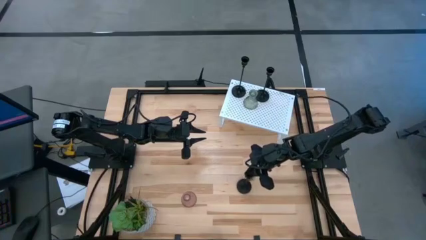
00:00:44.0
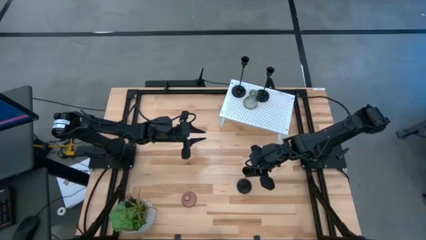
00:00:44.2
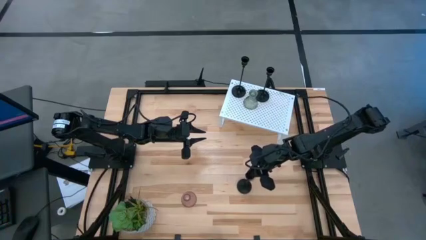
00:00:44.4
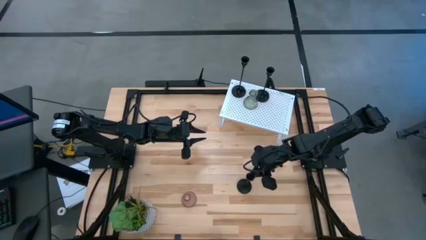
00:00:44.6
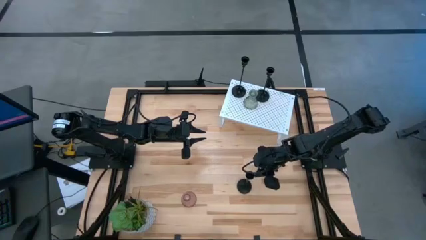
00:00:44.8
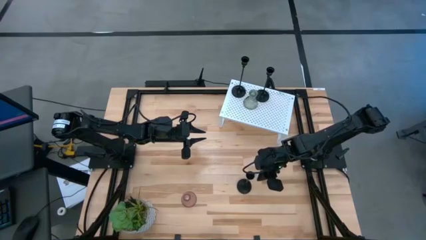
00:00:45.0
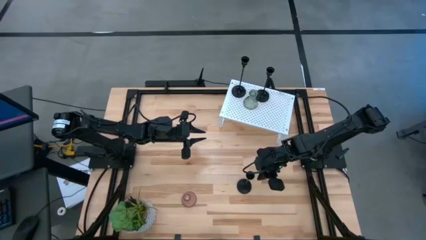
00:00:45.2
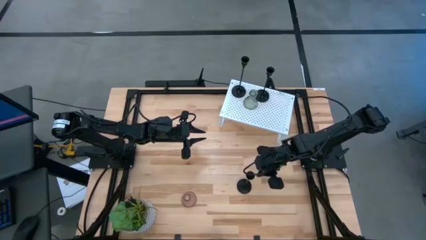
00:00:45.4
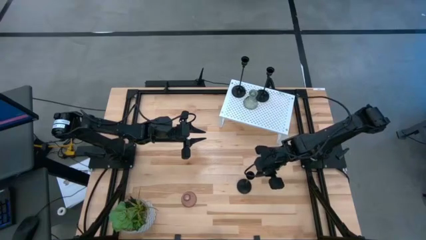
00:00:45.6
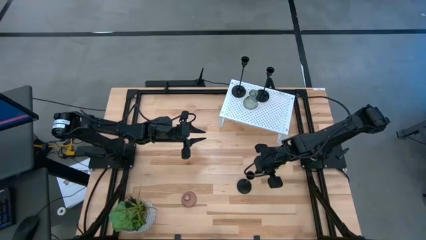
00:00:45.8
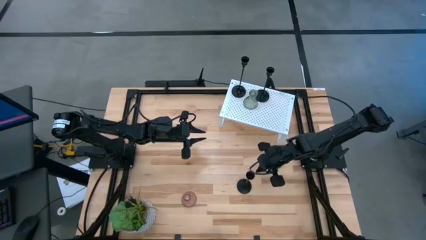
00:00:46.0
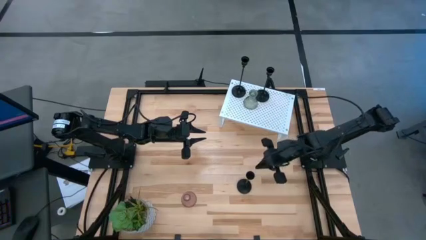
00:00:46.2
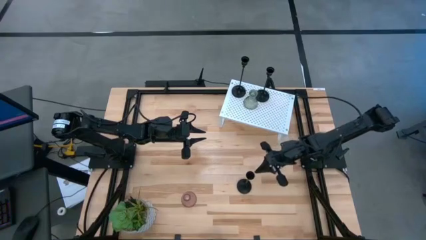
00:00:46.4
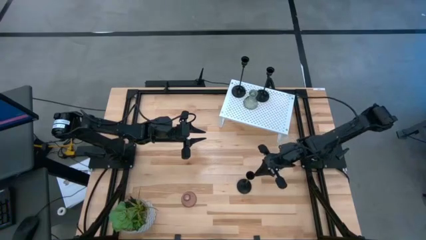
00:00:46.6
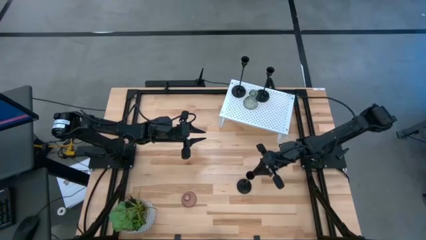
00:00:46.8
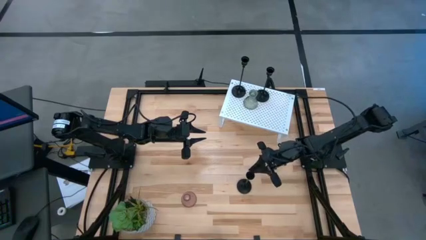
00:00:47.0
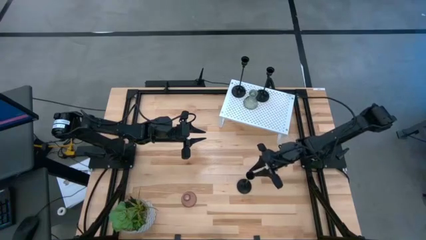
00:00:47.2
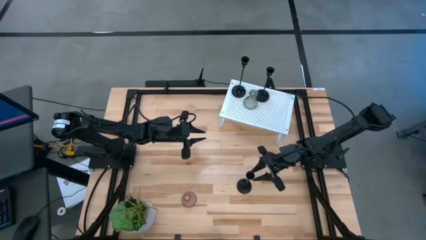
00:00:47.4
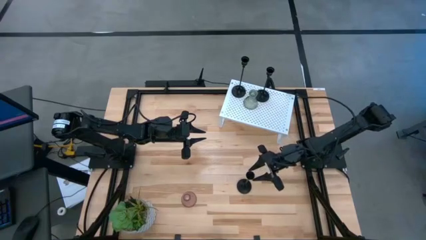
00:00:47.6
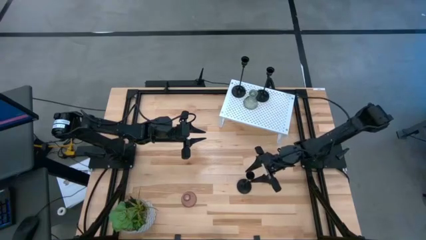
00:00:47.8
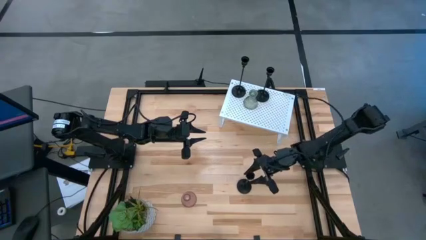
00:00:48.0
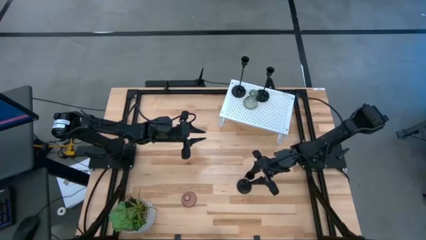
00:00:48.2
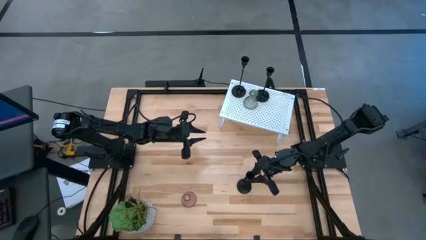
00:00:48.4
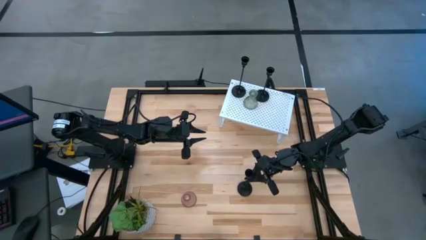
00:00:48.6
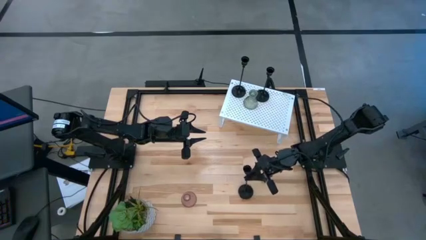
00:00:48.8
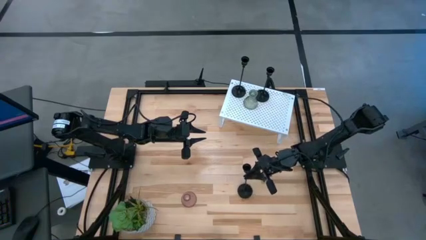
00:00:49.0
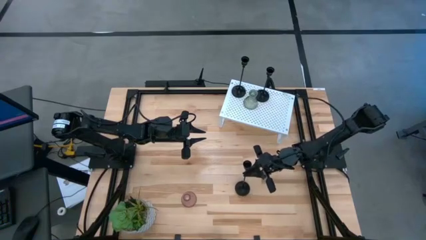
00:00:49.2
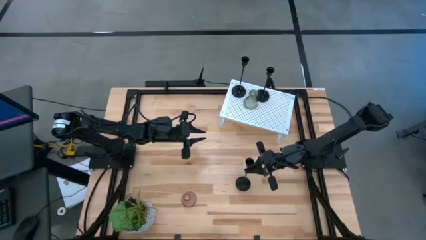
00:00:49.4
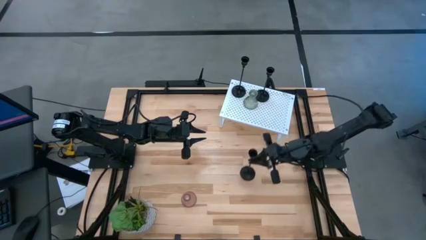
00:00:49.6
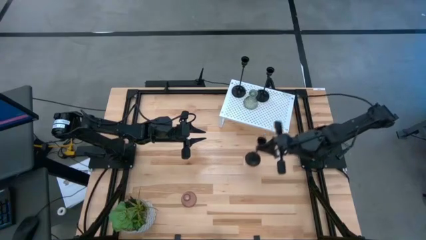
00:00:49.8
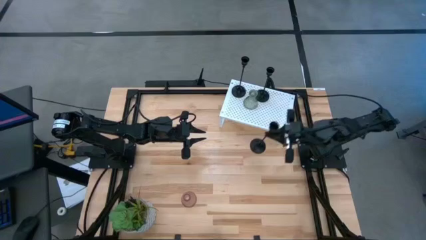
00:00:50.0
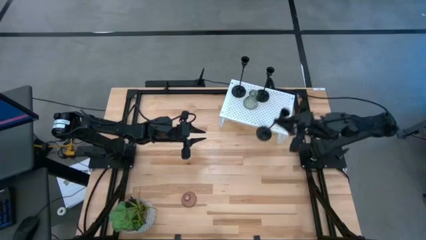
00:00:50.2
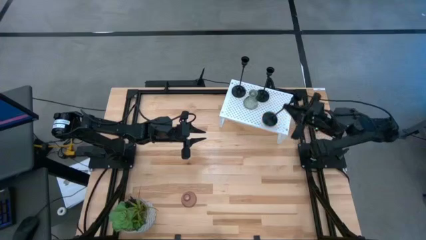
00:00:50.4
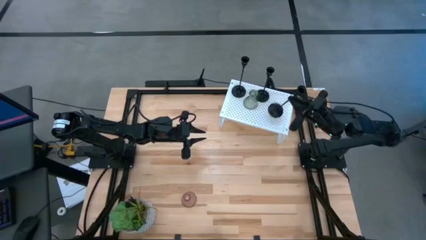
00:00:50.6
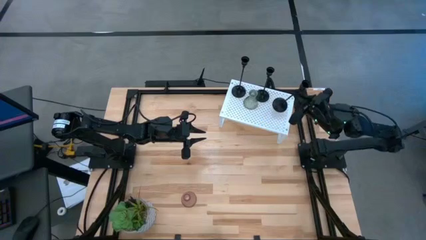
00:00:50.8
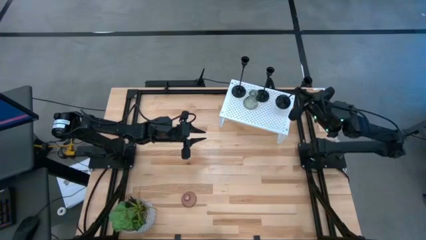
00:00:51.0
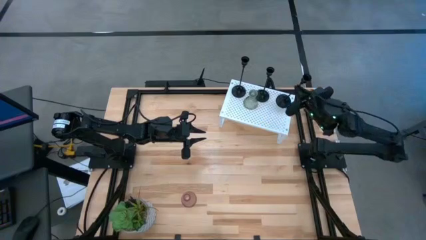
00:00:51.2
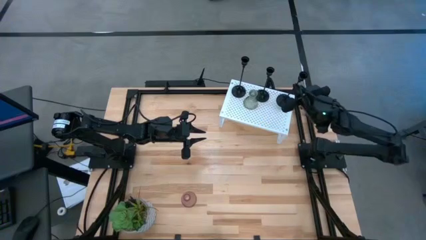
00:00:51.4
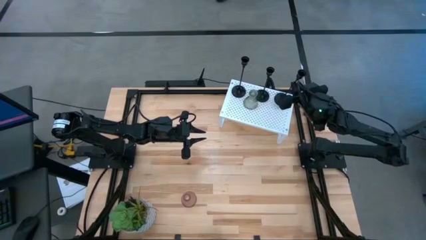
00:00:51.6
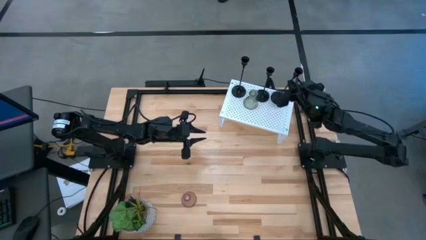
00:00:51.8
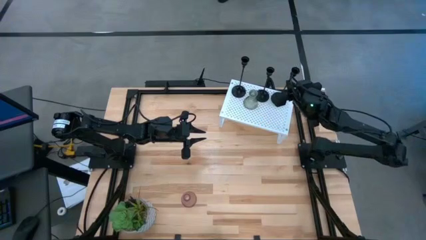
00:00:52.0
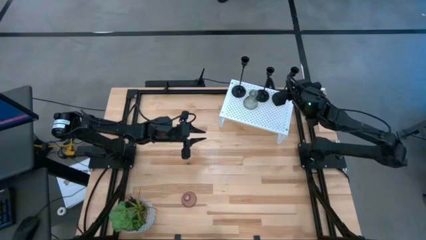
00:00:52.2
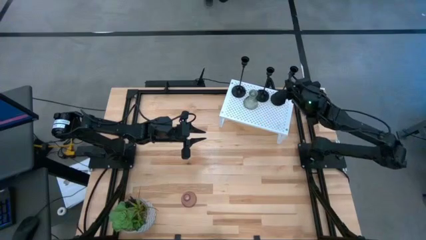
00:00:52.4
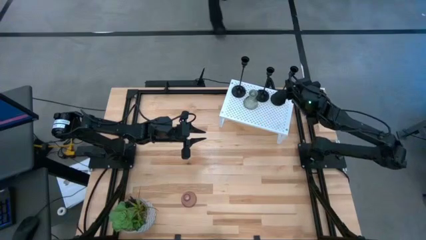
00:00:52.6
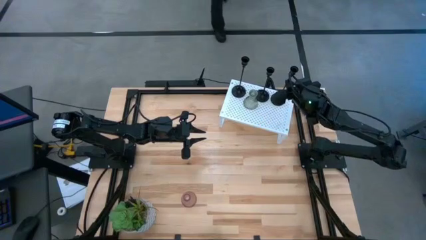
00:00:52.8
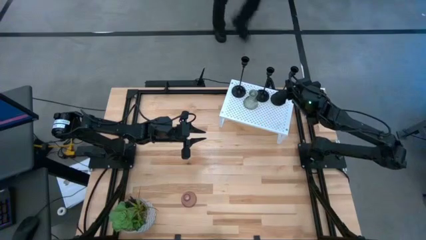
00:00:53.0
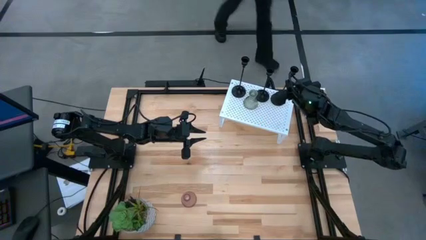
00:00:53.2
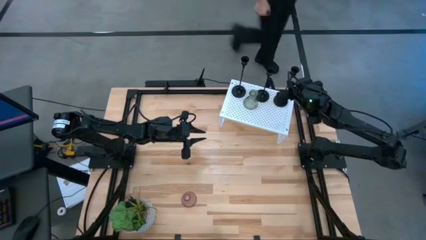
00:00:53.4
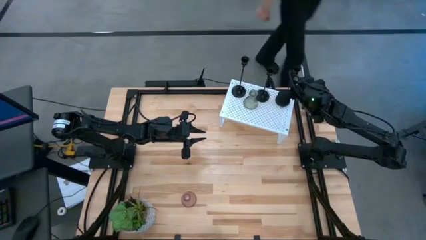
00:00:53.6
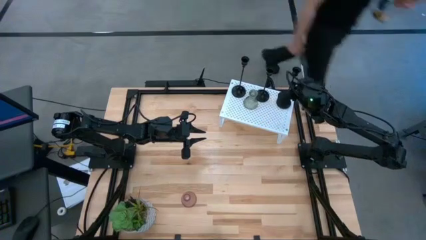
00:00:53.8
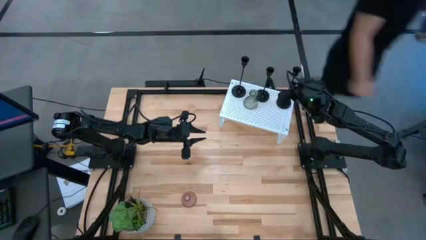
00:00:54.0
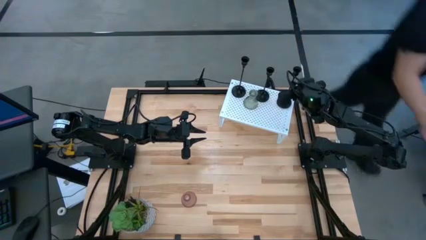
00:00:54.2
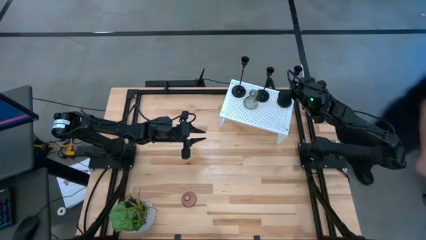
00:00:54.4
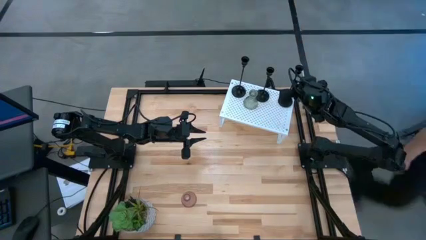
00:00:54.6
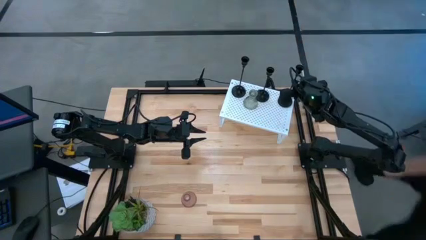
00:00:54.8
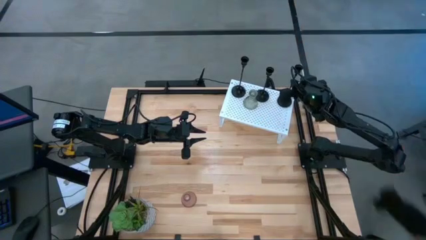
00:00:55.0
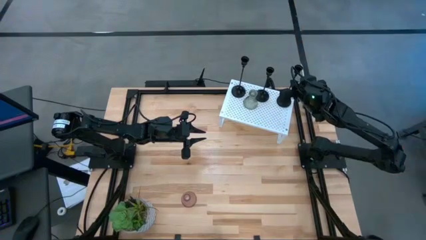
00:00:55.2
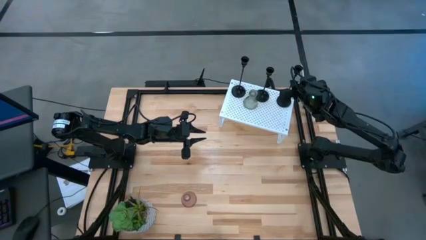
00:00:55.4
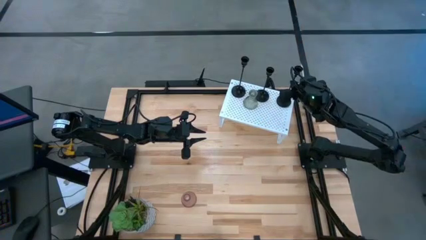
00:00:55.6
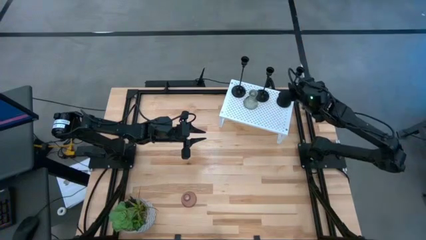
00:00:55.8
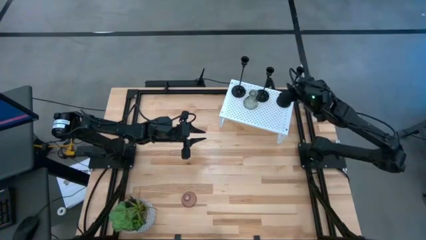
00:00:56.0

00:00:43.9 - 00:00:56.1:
Task: Pick & Place candle stick holders
Put the black candle holder on the shelf
